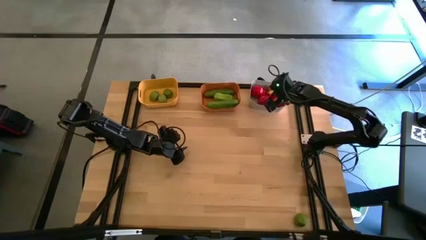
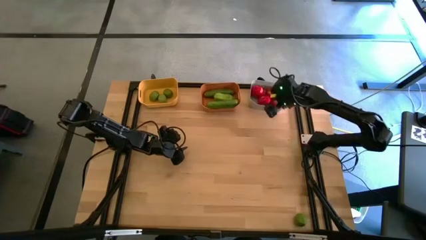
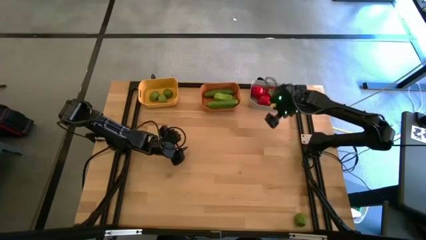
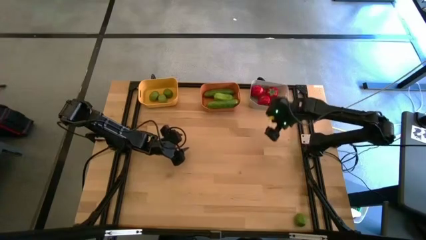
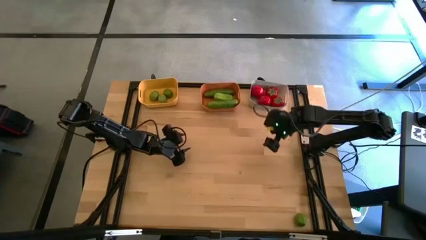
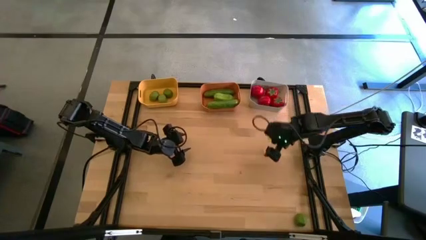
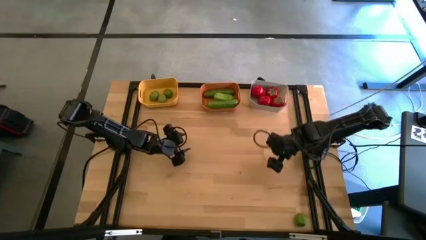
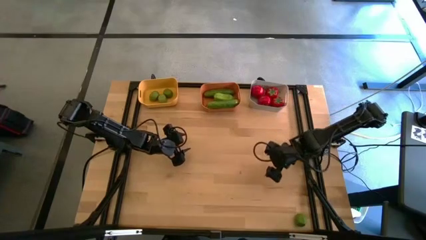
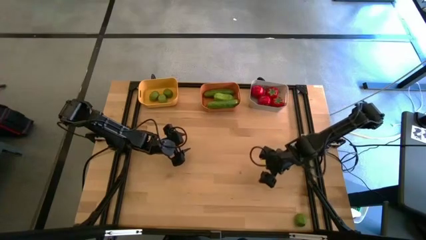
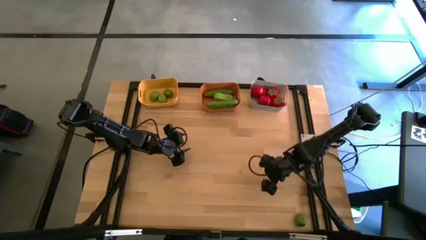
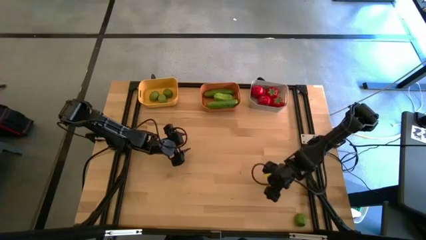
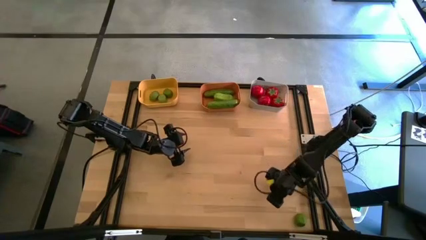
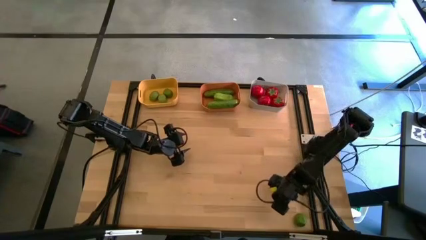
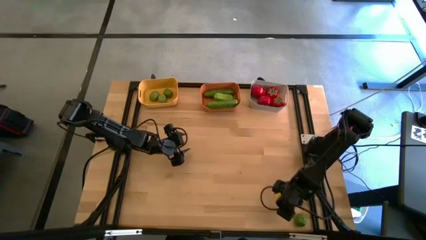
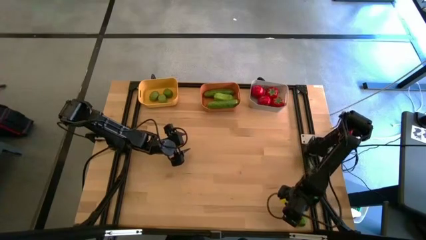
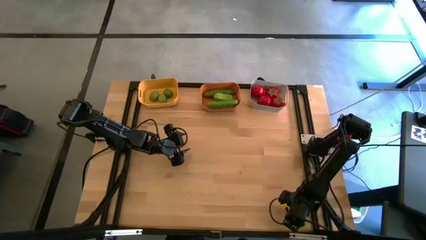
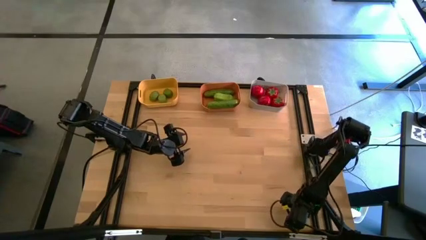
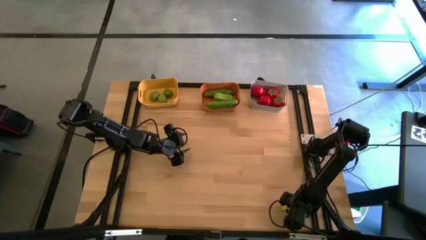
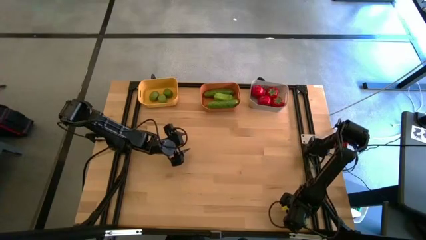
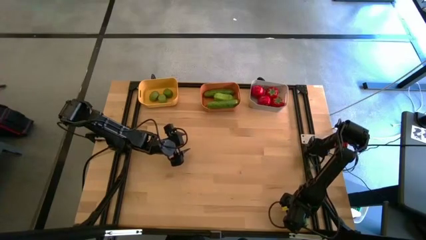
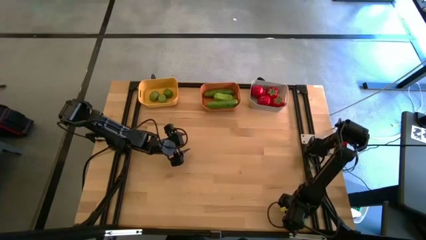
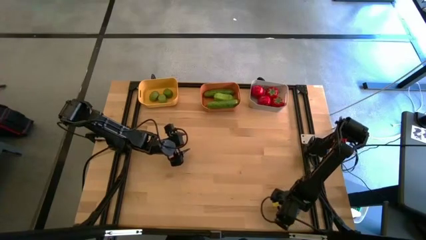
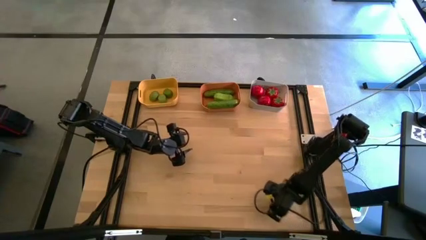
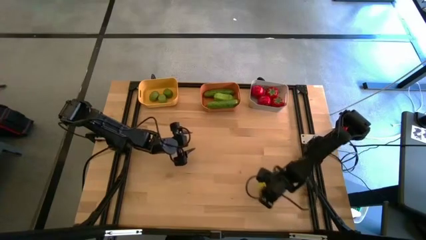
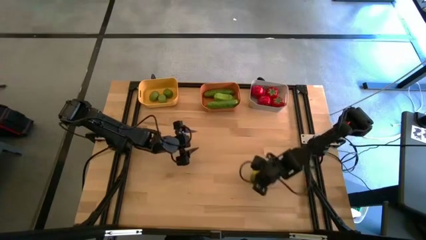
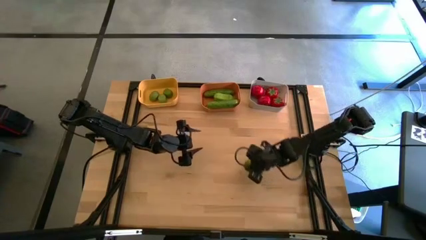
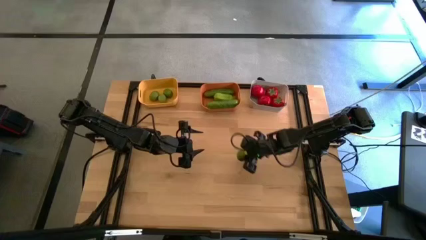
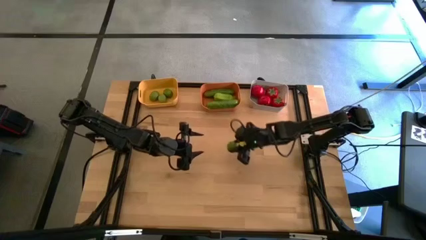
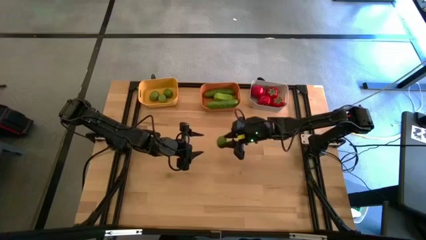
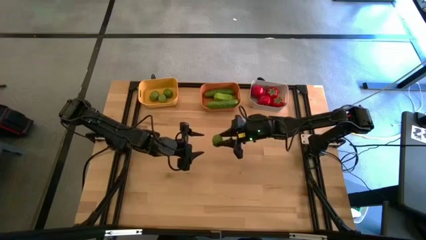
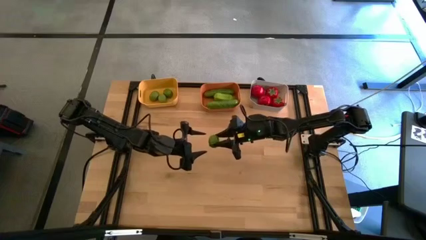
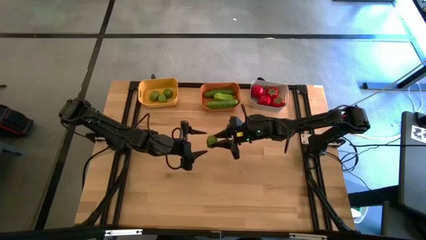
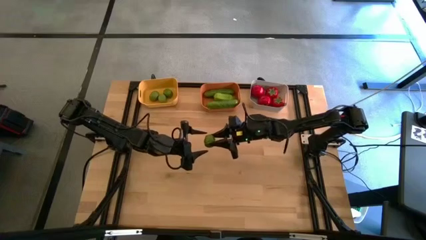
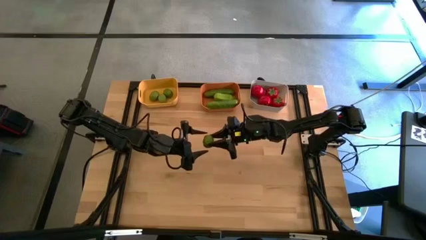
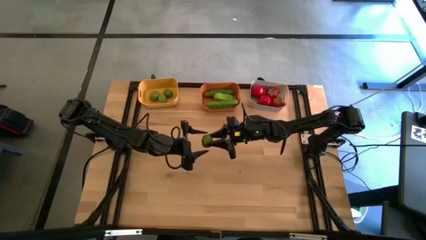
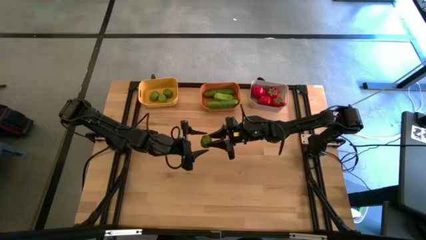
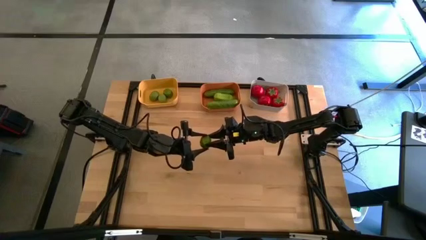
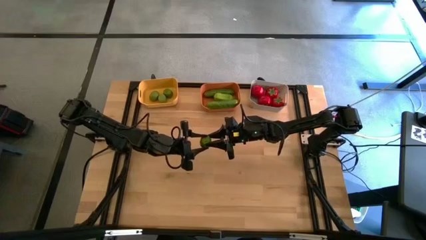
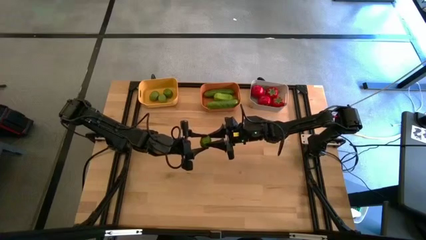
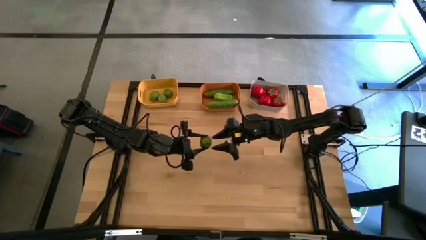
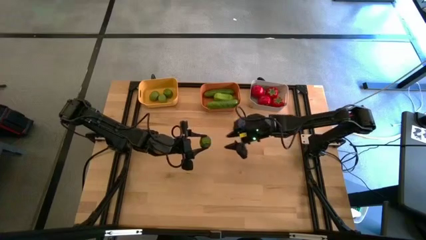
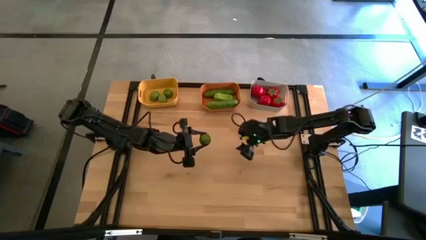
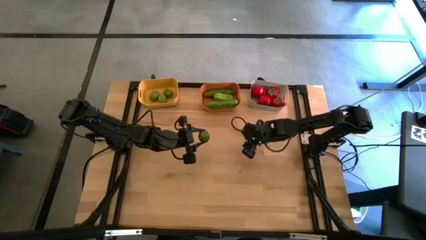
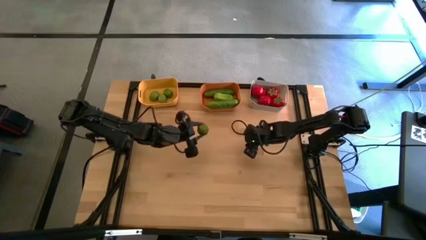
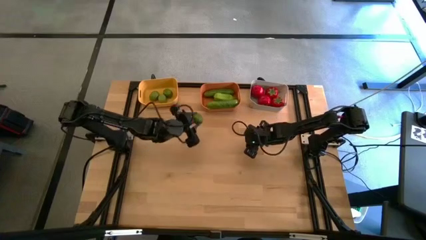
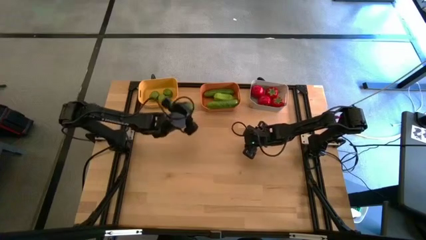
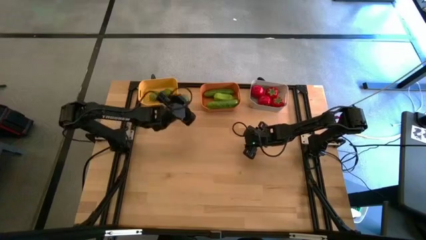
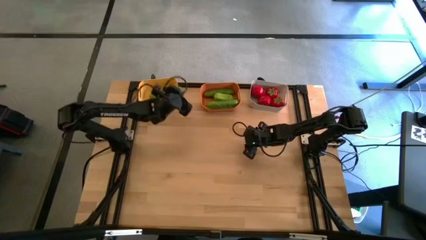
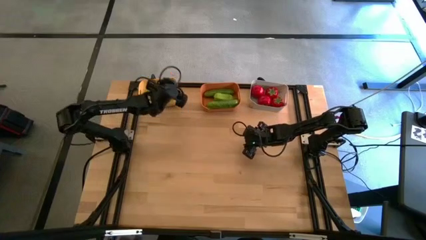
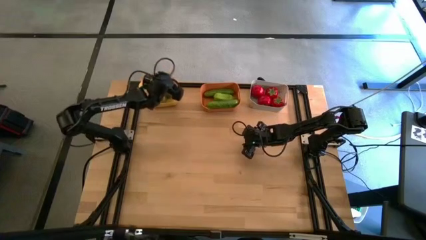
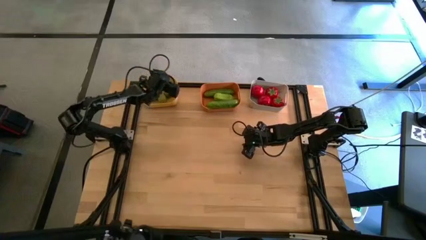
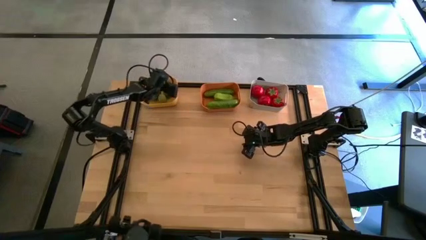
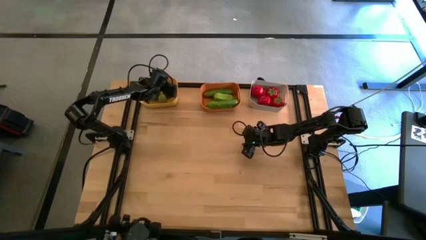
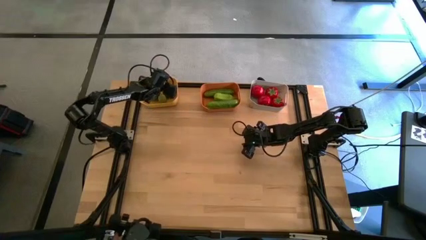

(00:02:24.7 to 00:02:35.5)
Task: Sort produce into baskets
Put the lime into the yellow bin

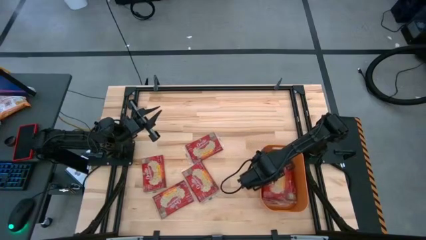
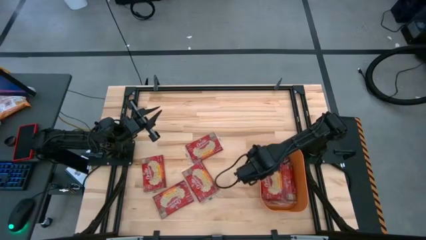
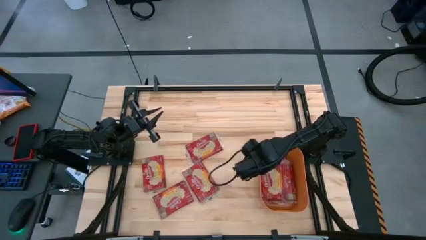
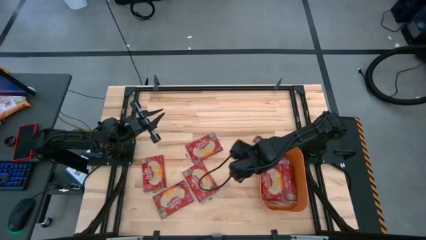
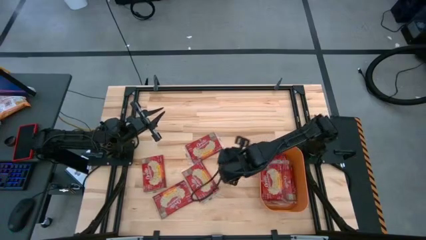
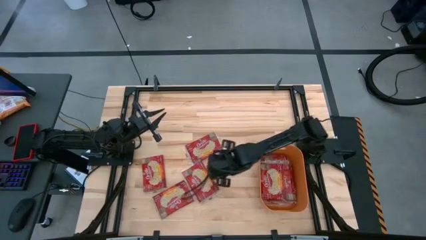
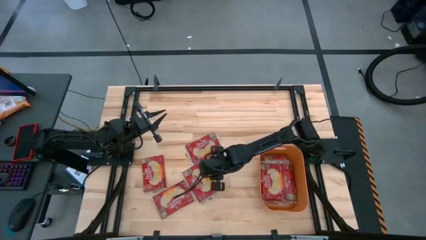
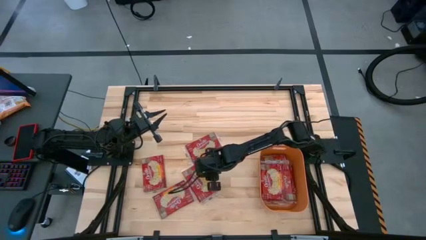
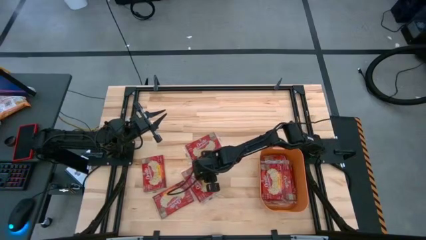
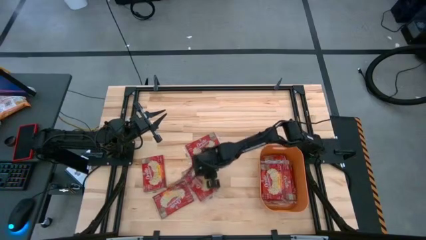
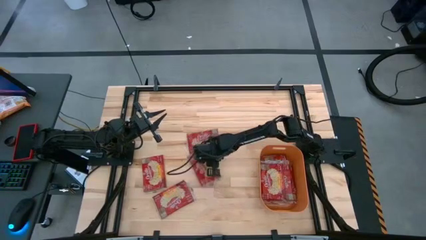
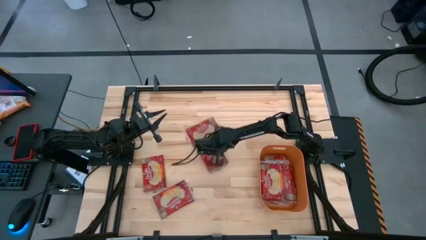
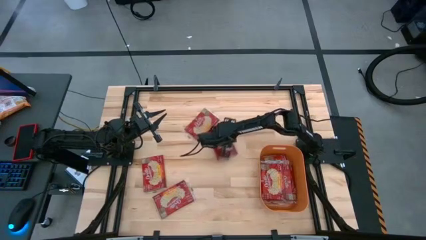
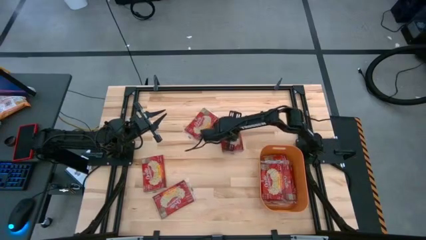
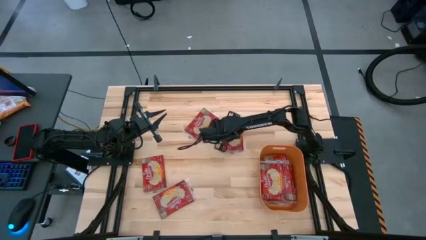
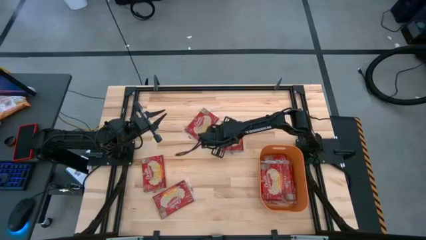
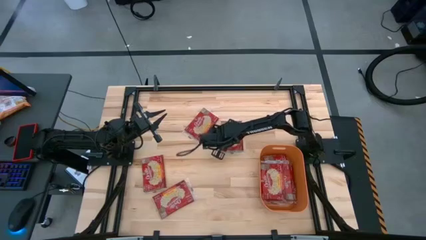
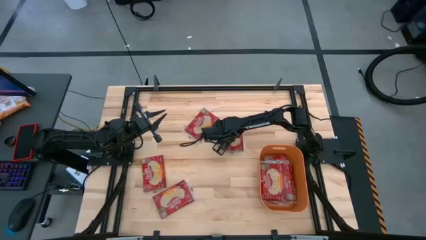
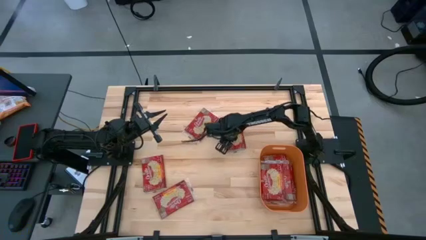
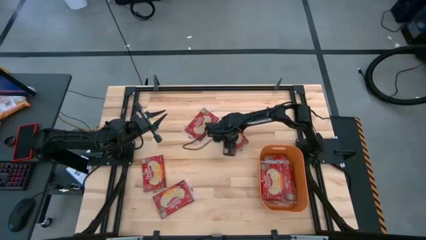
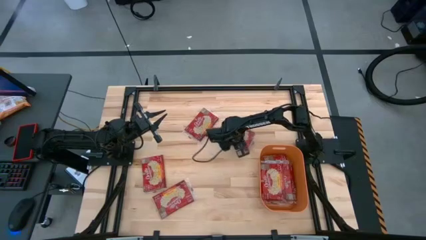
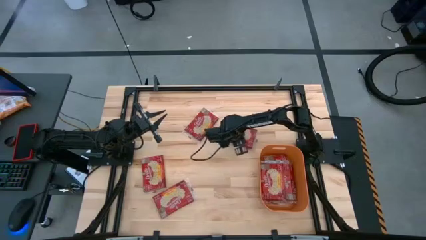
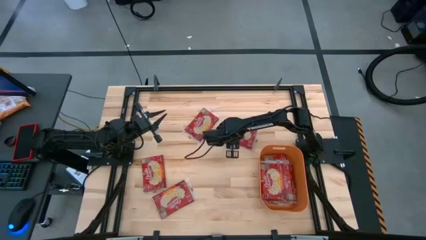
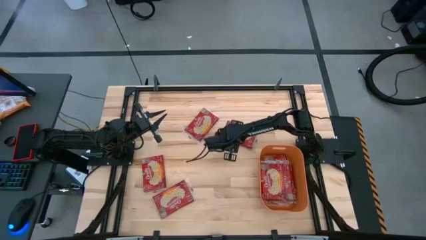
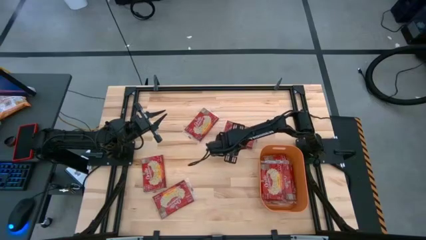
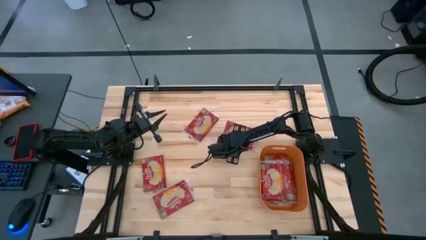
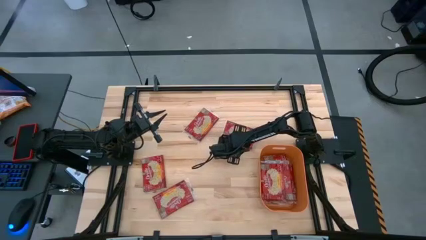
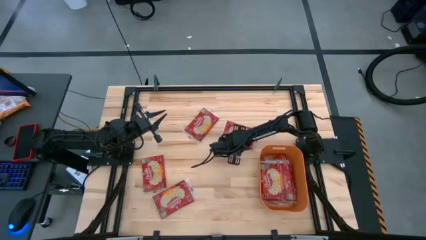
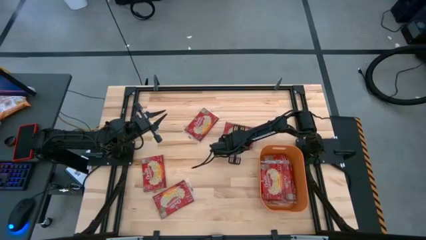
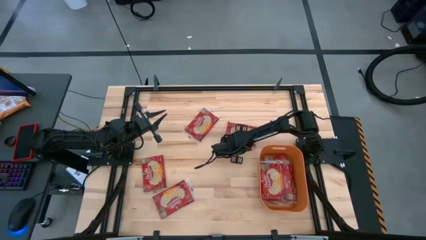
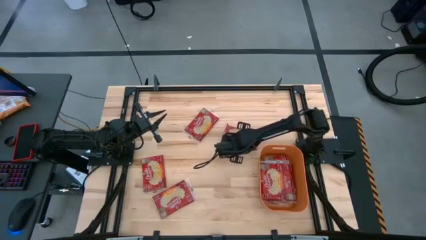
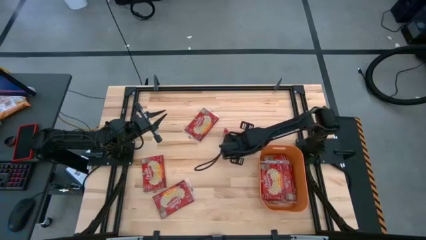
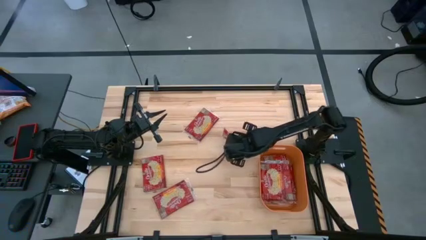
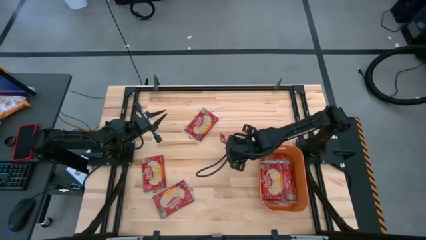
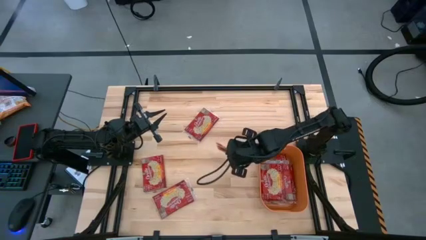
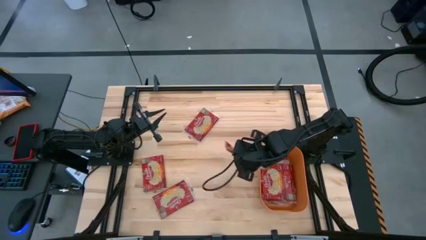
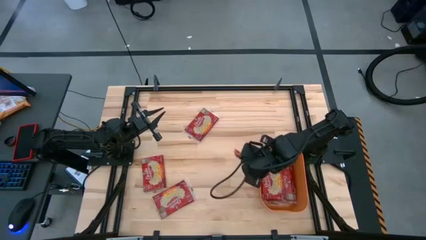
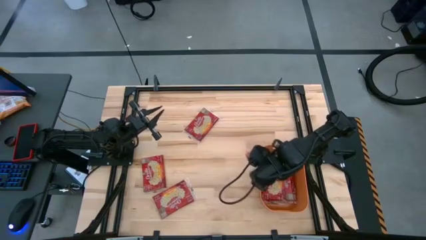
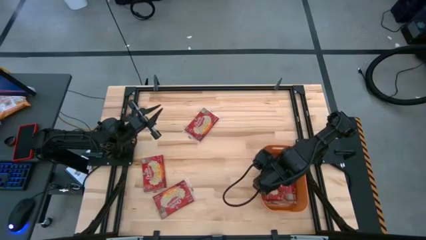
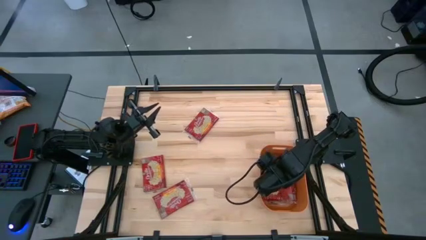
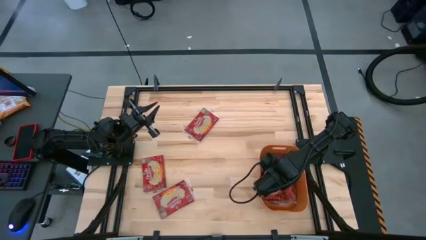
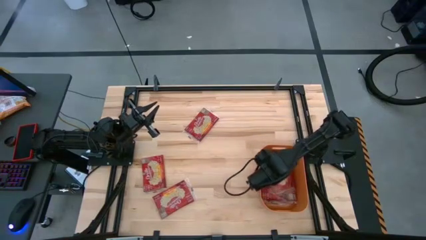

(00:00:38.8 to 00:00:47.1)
Task: Sort popcorn bags into baskets
Put the red popcorn bag into the orange bin
